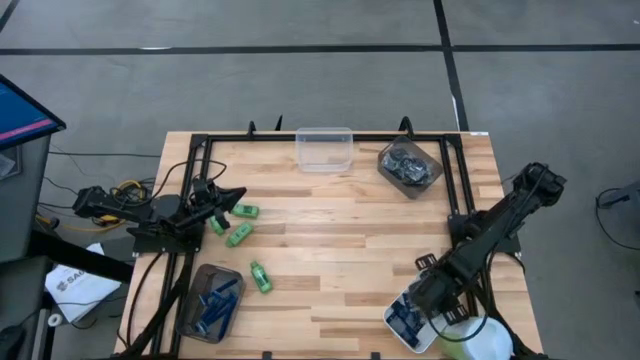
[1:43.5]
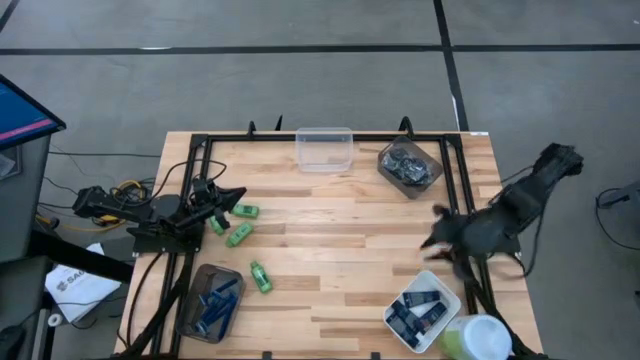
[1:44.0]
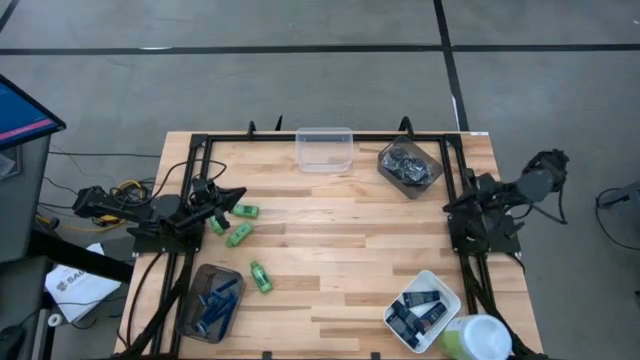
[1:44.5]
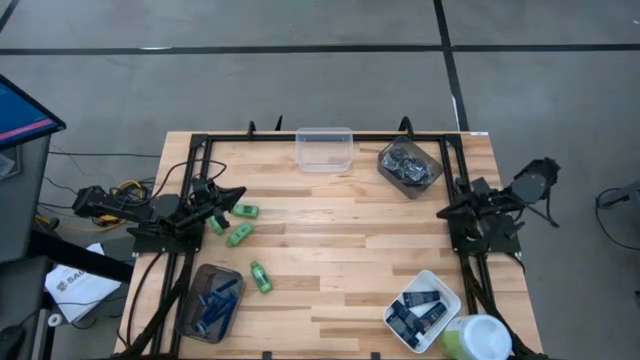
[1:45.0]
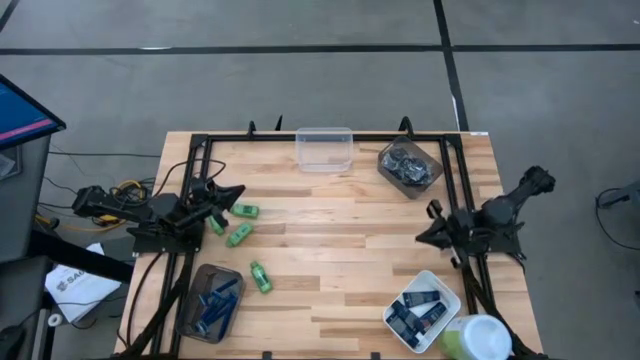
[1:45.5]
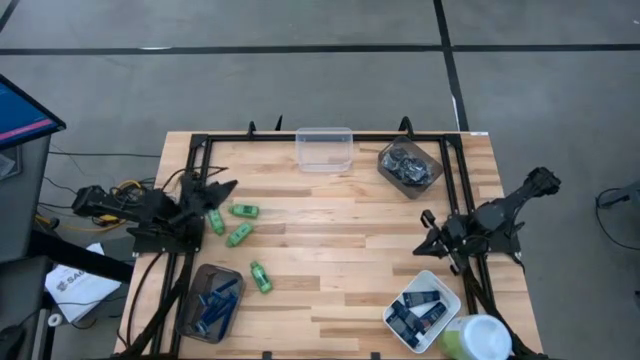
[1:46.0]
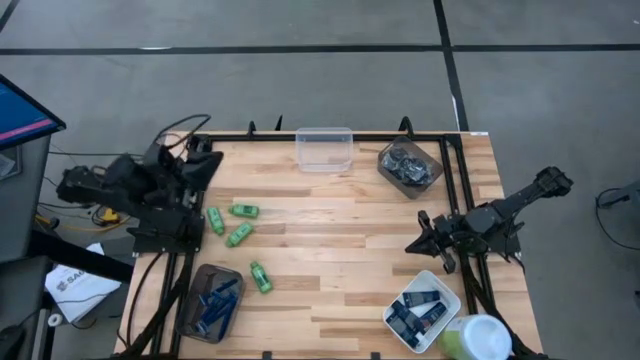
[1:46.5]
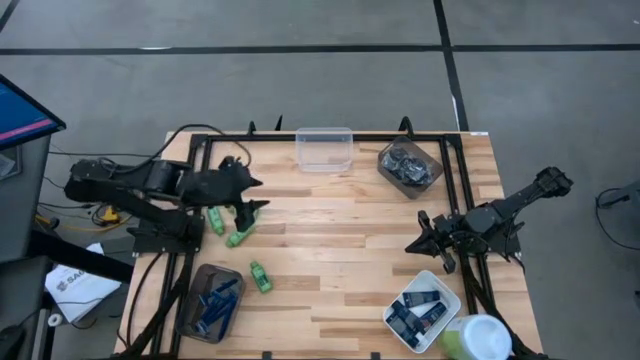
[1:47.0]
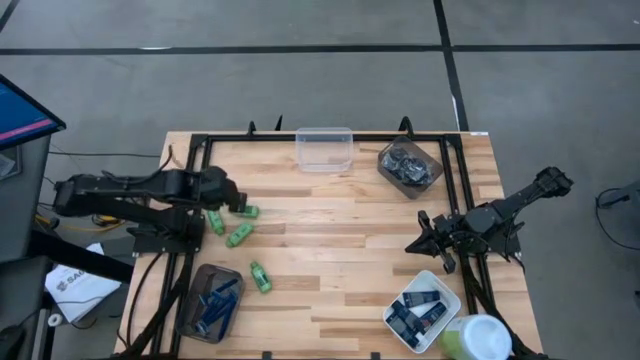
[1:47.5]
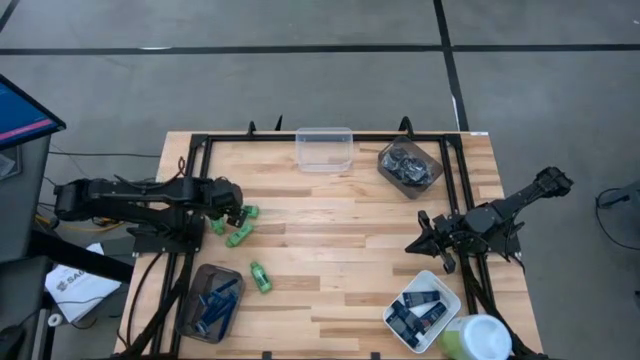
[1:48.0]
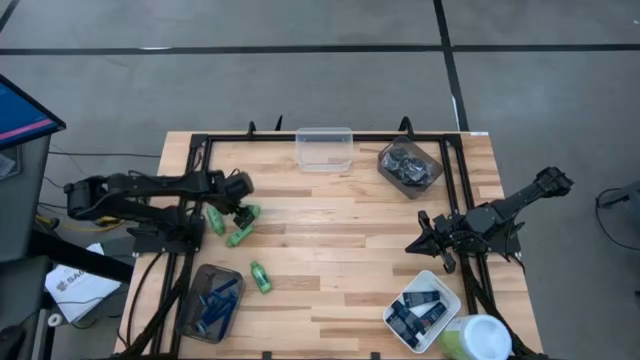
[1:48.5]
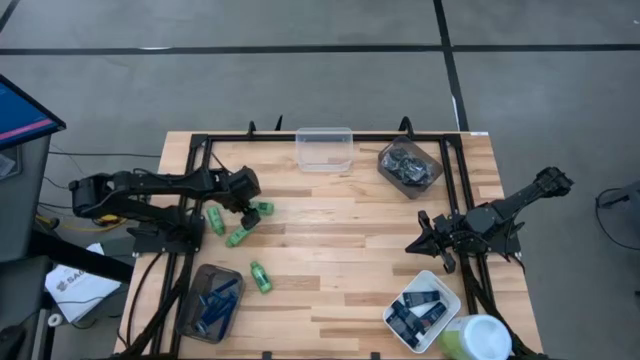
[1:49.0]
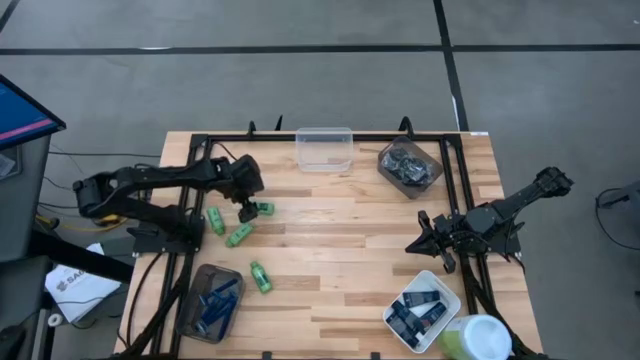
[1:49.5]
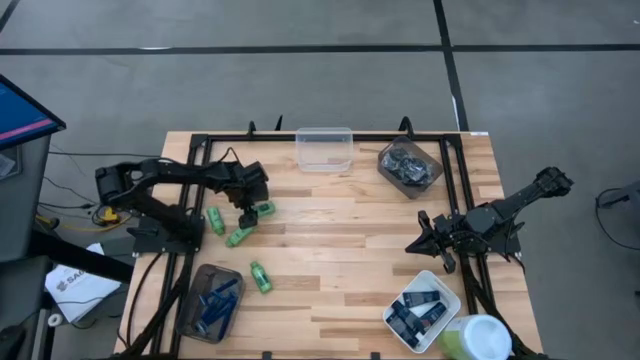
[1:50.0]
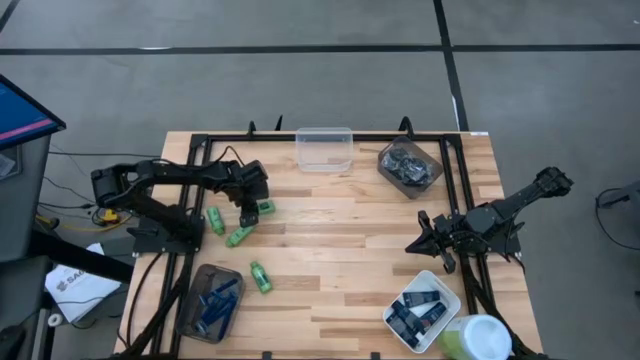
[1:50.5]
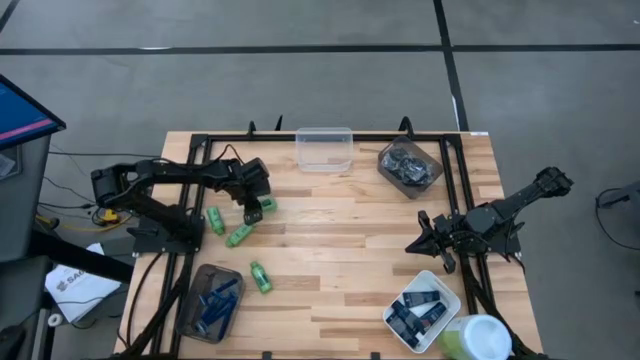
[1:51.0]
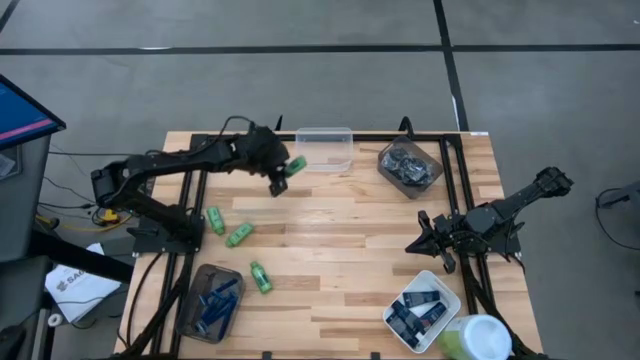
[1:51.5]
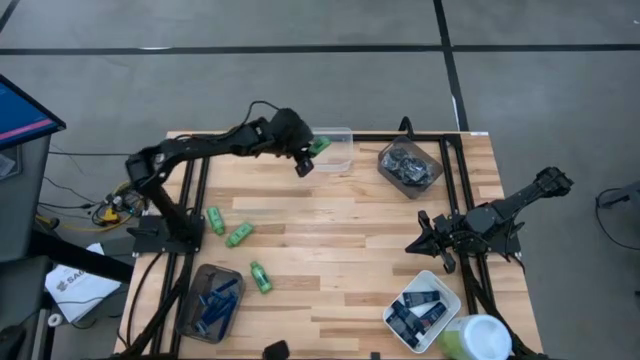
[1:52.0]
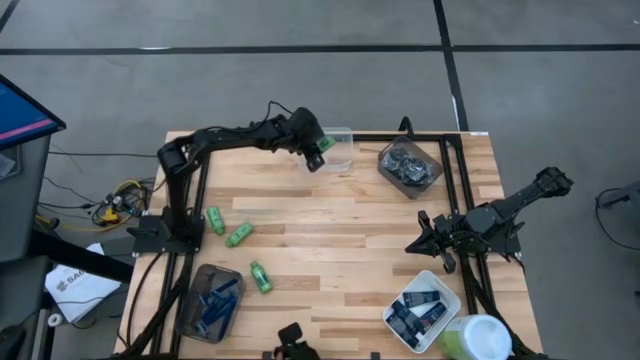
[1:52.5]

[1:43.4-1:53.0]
Task: Pick & Place Travel size toiletries
Put the green shampoo into the transparent bin

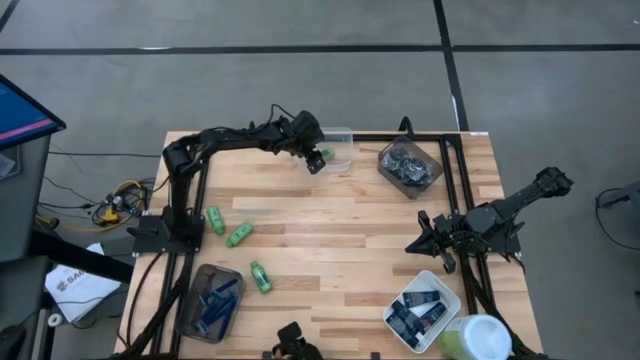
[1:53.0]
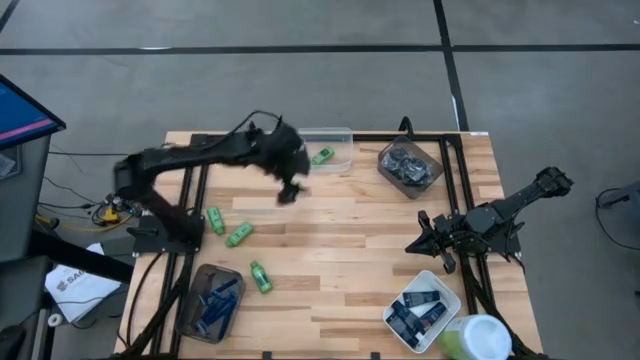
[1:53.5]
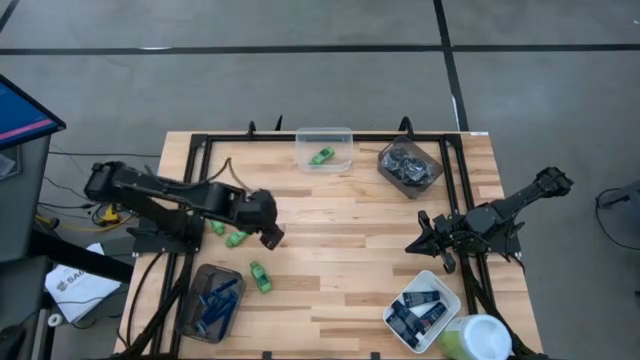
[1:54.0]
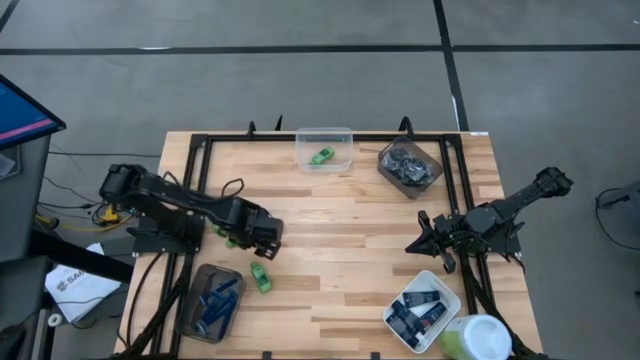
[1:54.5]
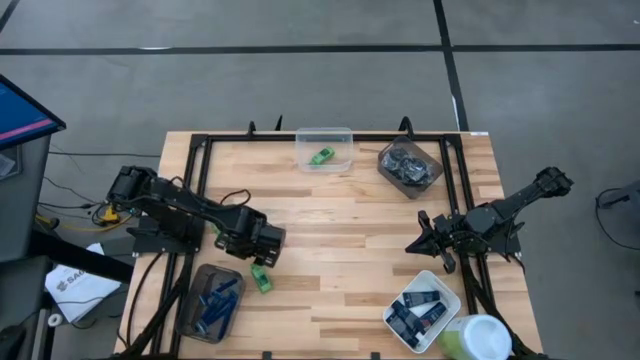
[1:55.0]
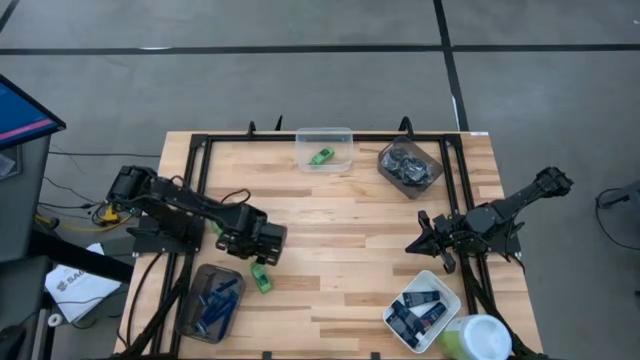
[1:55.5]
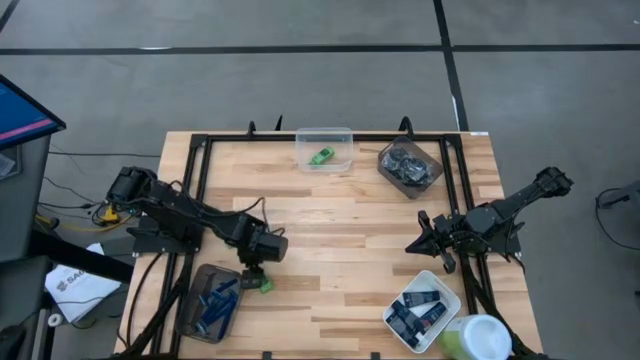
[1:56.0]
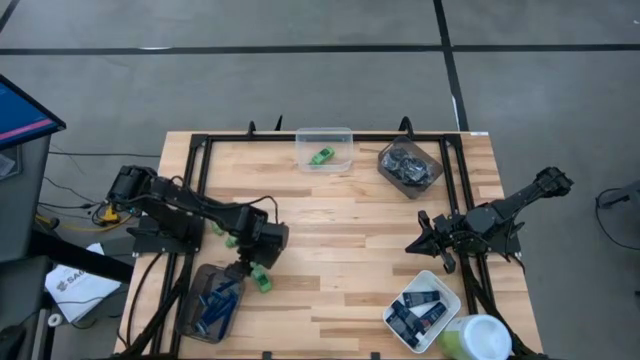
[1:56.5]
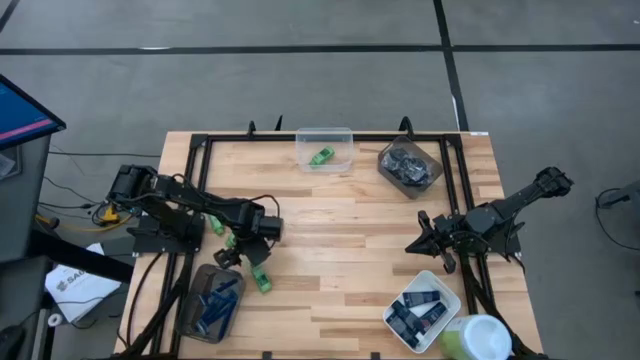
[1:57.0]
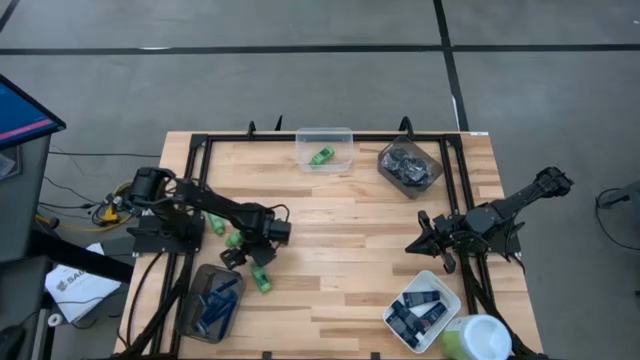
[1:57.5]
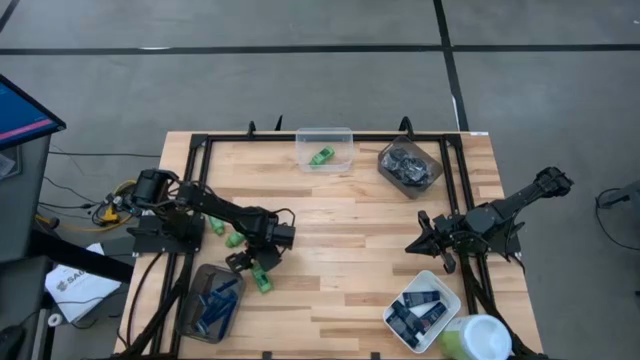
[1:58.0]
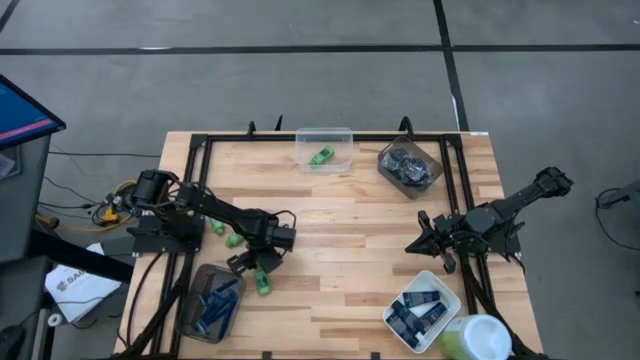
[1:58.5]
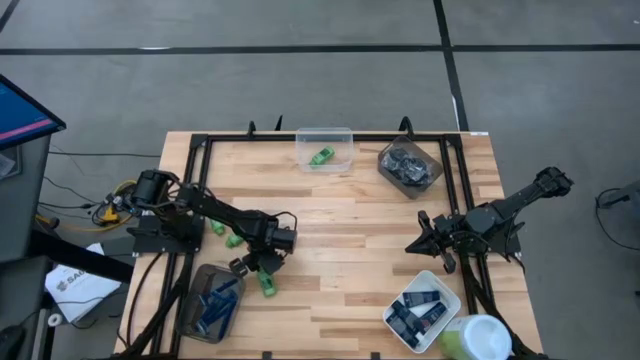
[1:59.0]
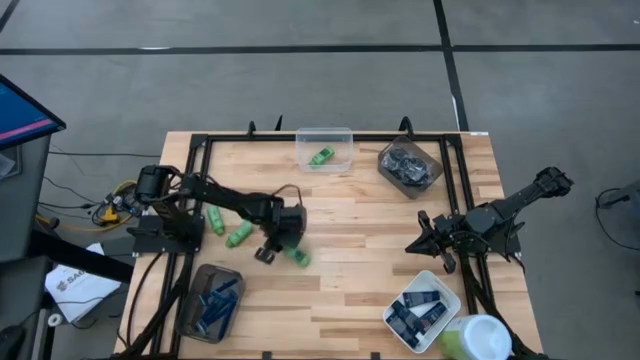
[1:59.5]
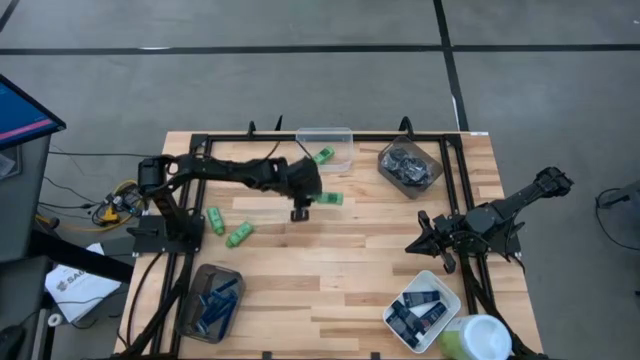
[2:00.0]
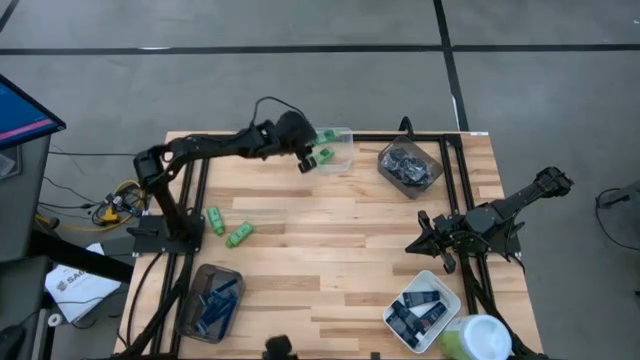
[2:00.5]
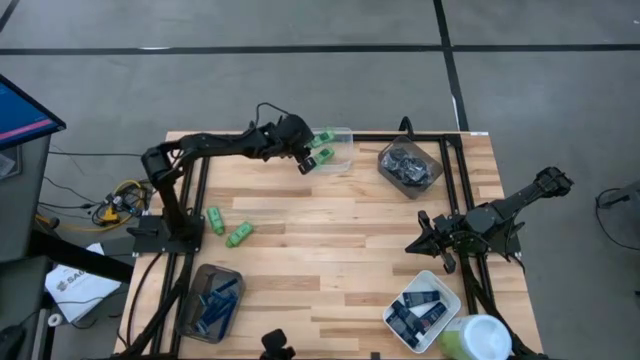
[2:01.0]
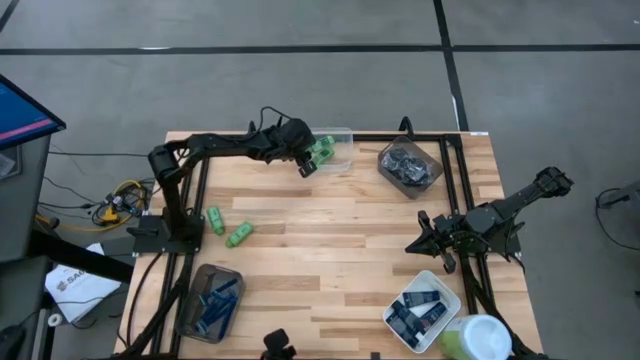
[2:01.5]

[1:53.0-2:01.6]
Put the green shampoo into the transparent bin

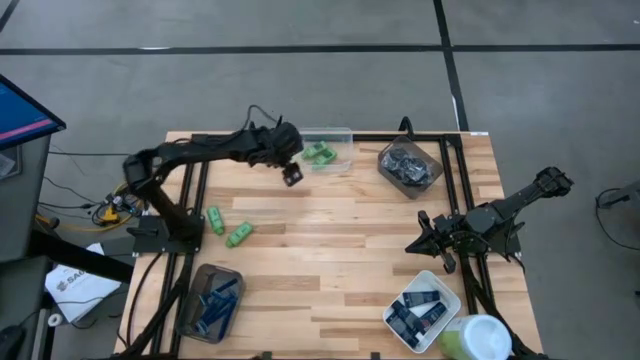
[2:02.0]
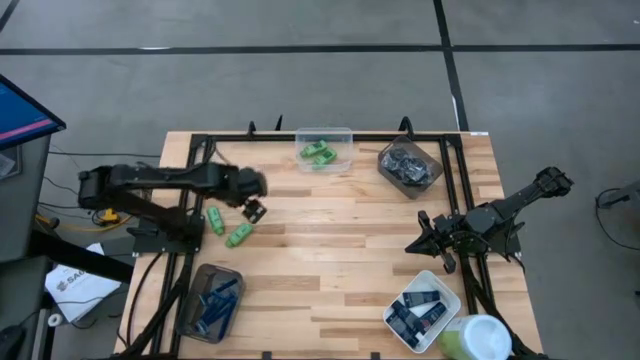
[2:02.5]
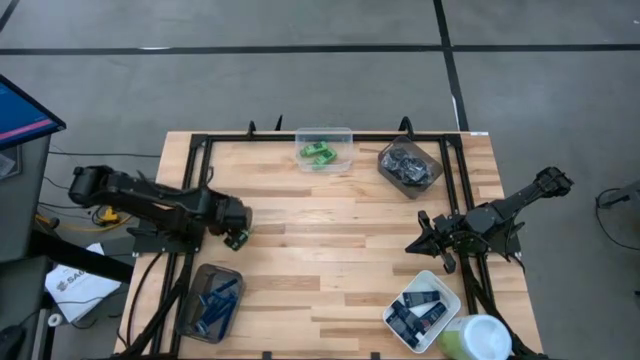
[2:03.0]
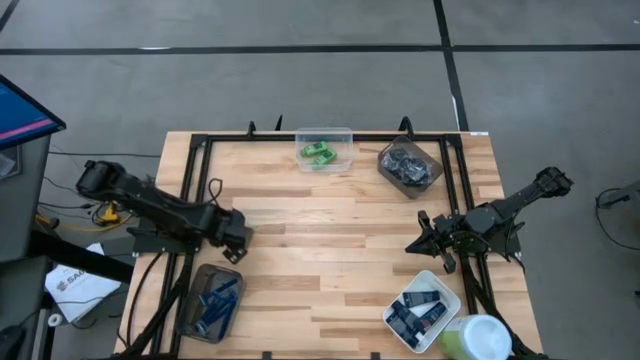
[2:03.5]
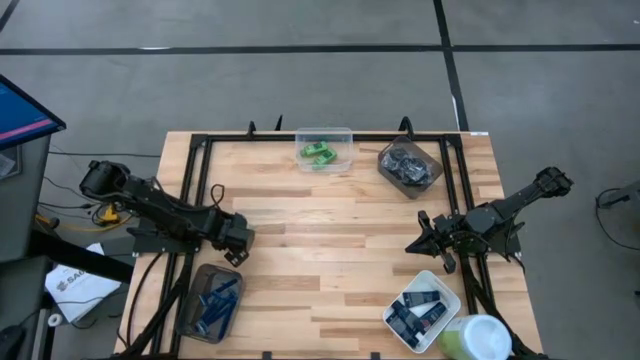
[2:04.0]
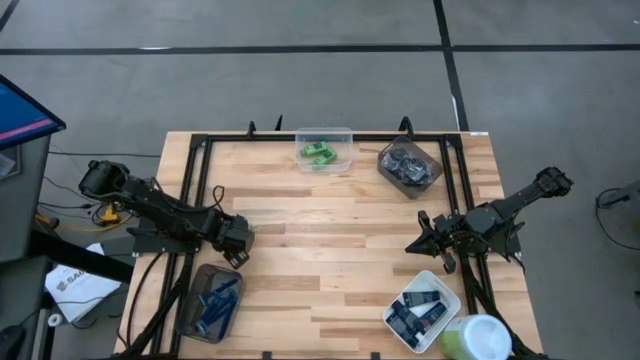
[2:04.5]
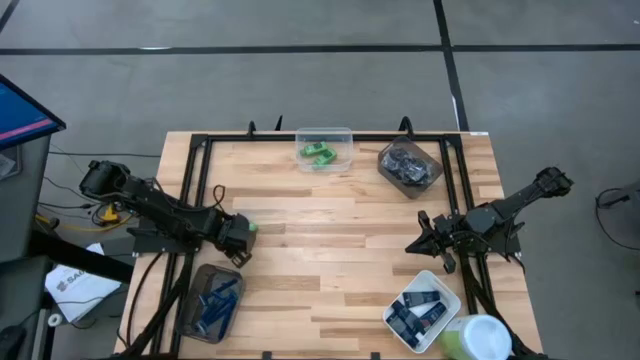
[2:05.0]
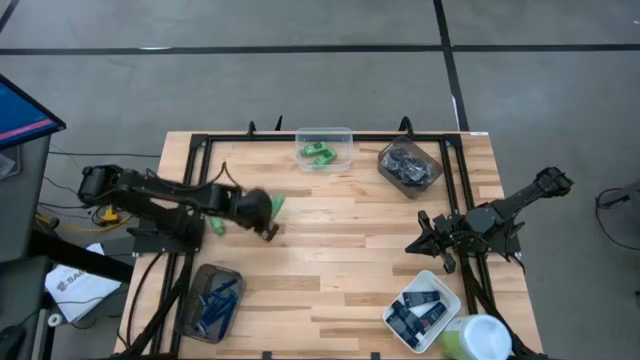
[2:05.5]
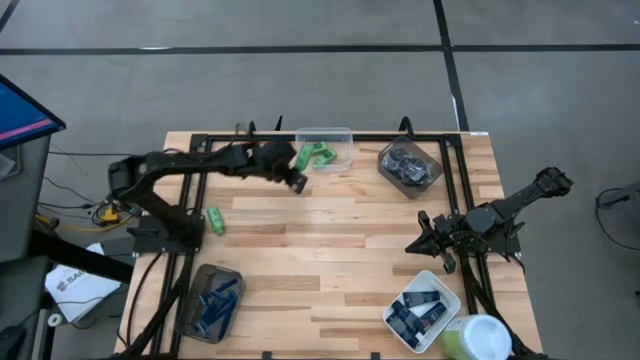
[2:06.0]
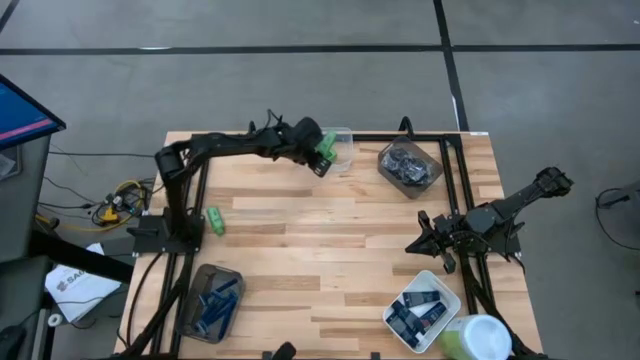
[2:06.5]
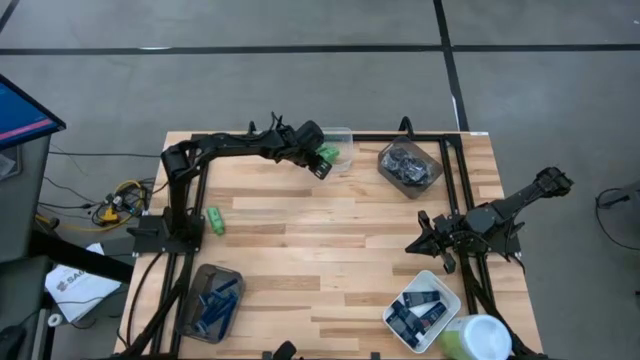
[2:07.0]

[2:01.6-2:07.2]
Put the green shampoo into the transparent bin
